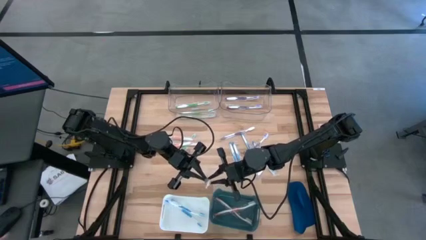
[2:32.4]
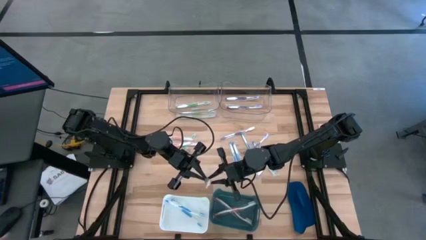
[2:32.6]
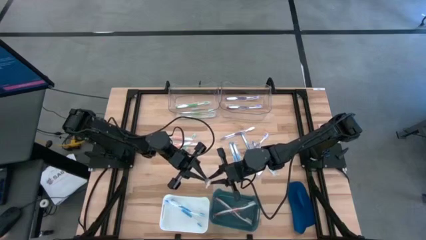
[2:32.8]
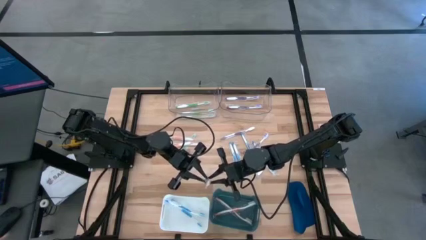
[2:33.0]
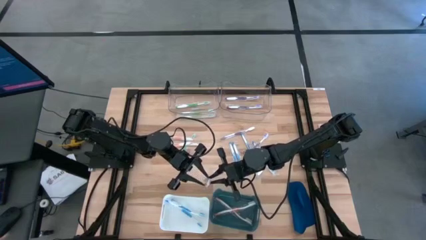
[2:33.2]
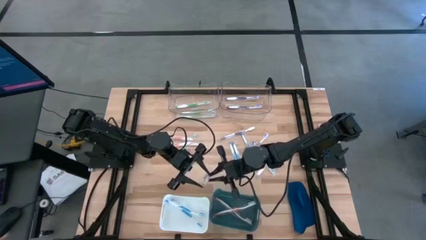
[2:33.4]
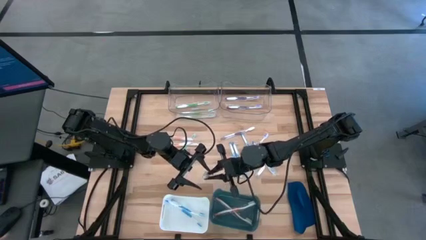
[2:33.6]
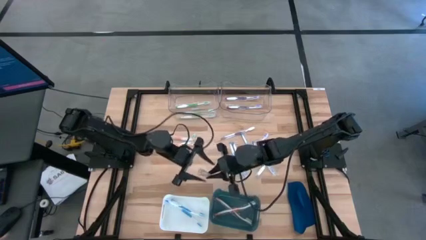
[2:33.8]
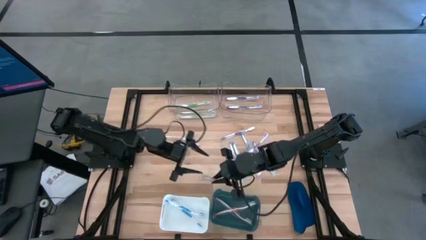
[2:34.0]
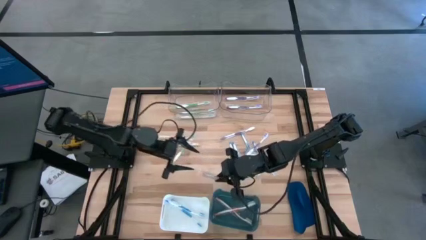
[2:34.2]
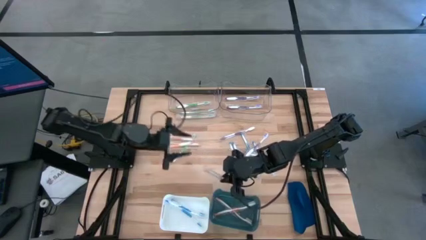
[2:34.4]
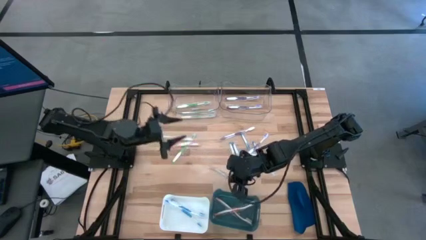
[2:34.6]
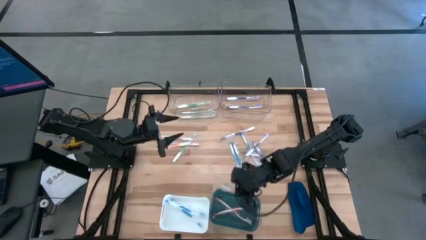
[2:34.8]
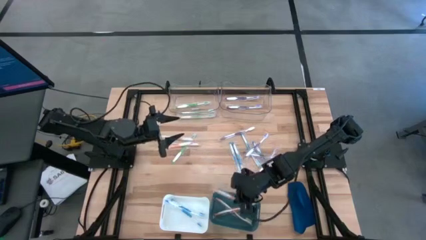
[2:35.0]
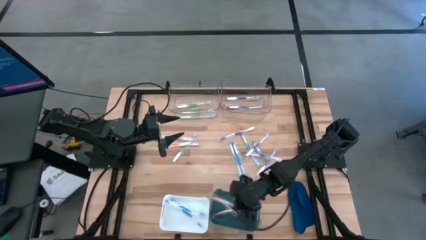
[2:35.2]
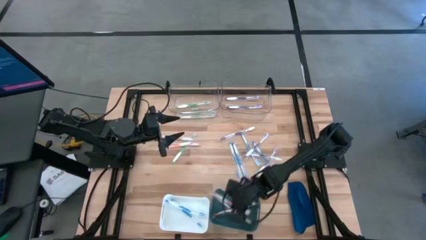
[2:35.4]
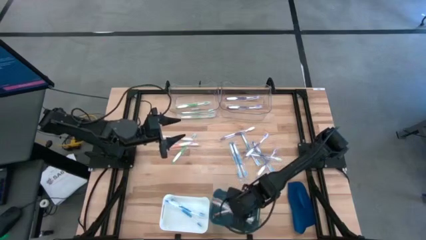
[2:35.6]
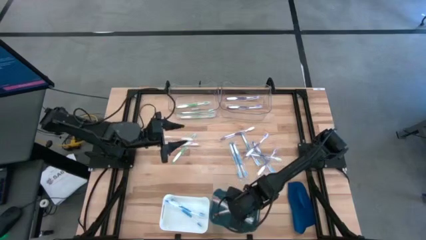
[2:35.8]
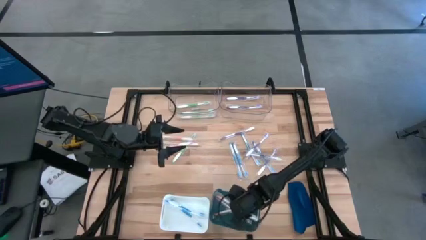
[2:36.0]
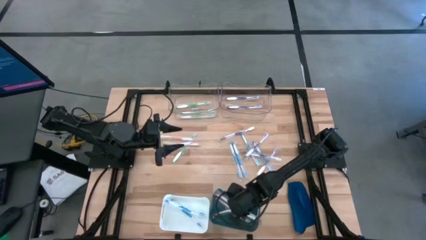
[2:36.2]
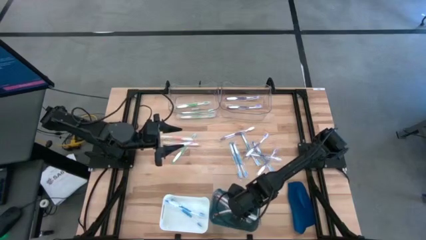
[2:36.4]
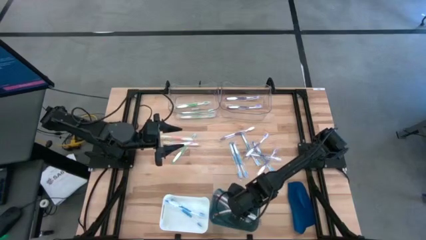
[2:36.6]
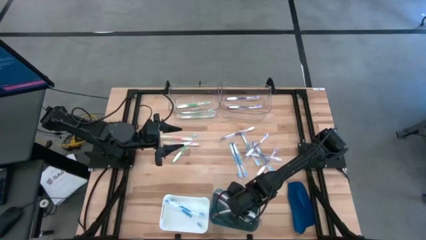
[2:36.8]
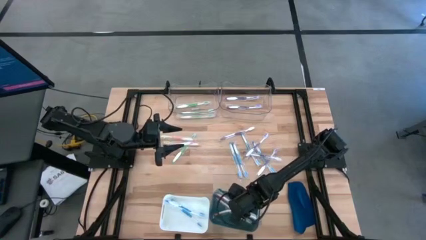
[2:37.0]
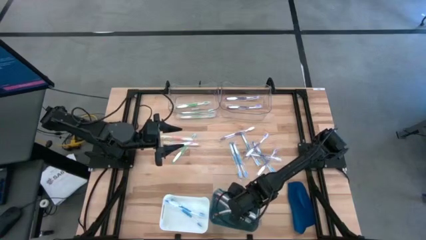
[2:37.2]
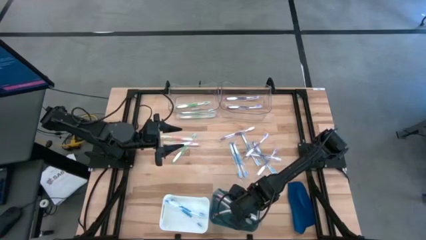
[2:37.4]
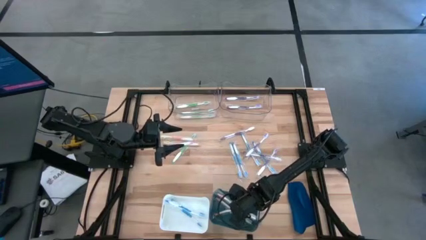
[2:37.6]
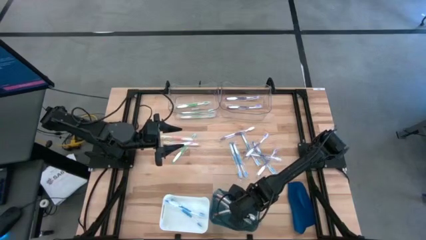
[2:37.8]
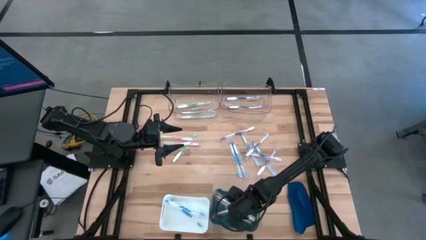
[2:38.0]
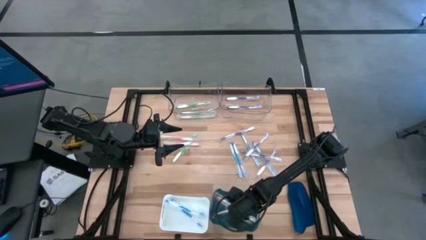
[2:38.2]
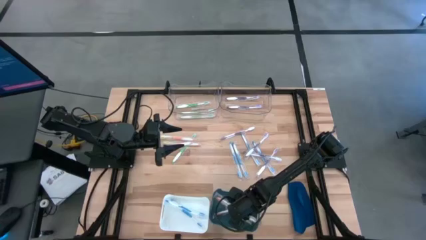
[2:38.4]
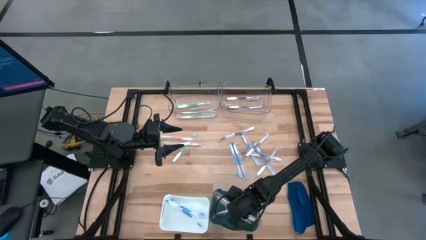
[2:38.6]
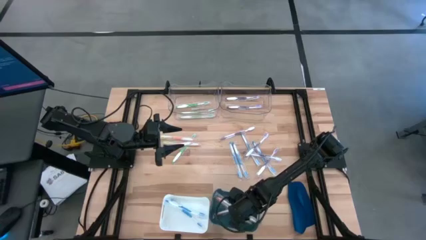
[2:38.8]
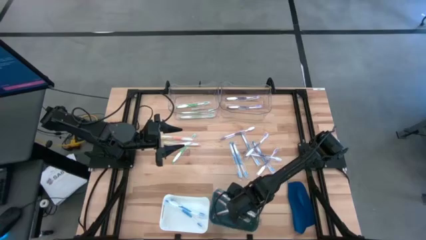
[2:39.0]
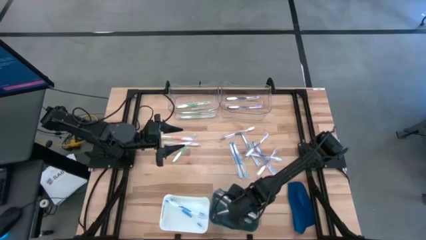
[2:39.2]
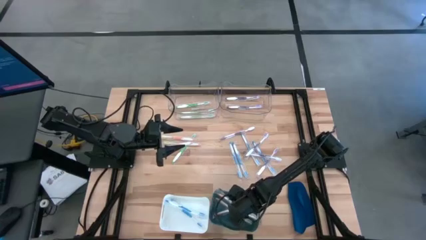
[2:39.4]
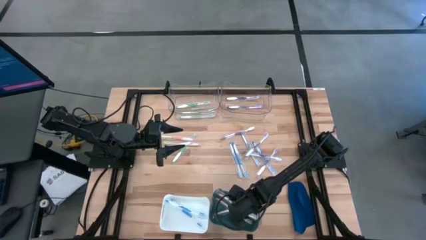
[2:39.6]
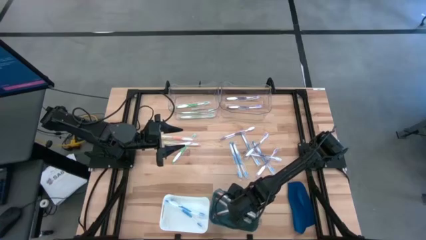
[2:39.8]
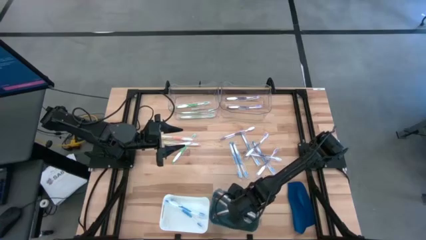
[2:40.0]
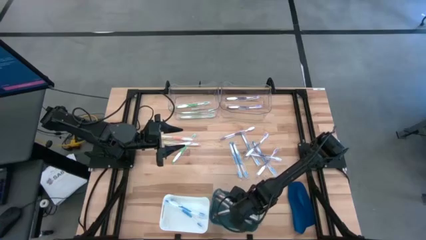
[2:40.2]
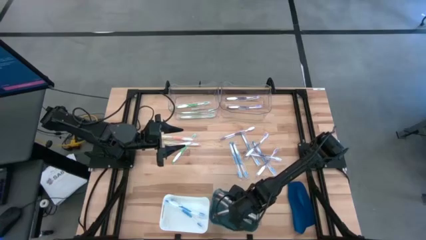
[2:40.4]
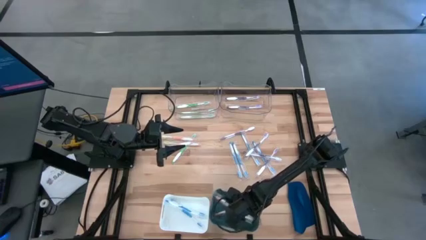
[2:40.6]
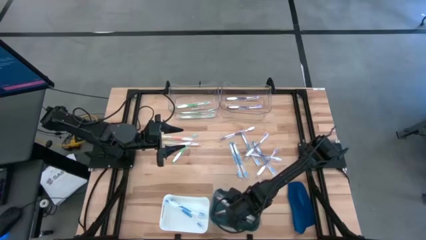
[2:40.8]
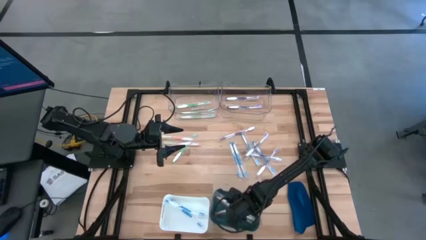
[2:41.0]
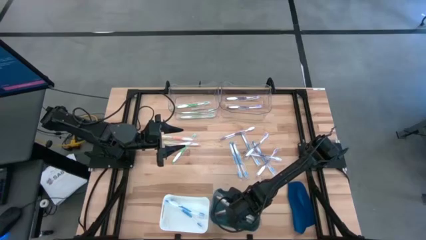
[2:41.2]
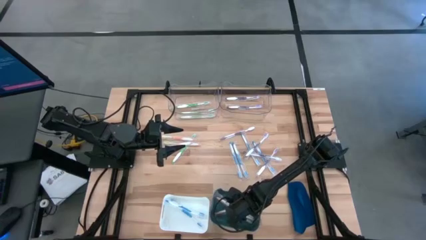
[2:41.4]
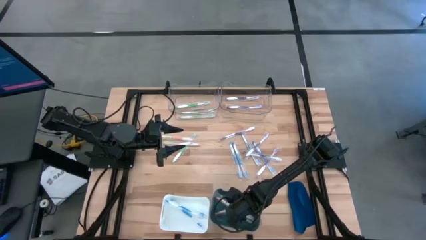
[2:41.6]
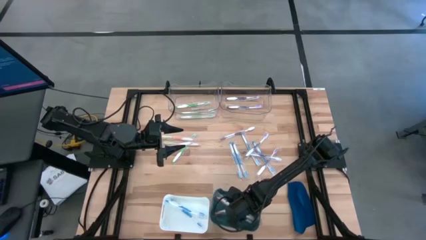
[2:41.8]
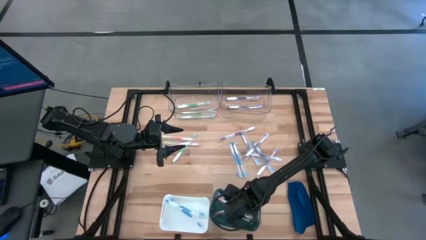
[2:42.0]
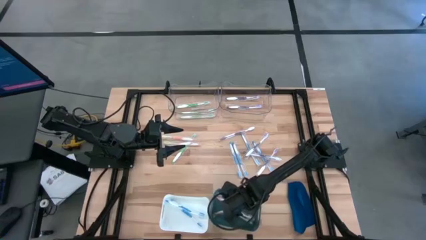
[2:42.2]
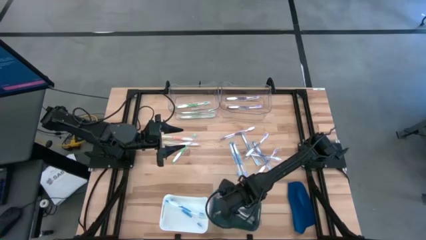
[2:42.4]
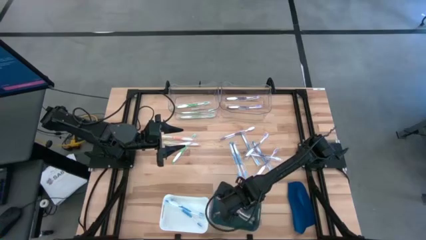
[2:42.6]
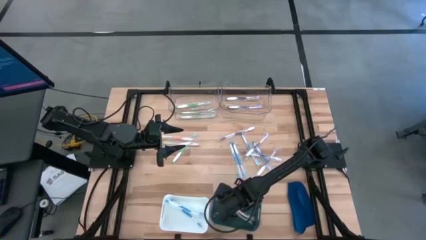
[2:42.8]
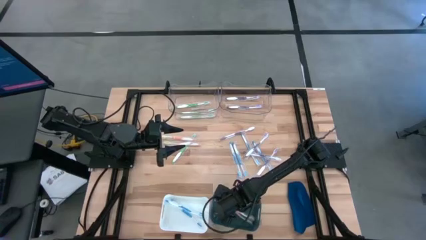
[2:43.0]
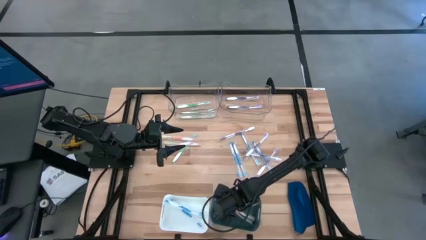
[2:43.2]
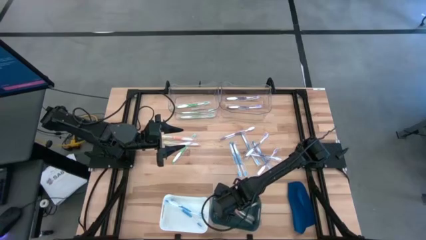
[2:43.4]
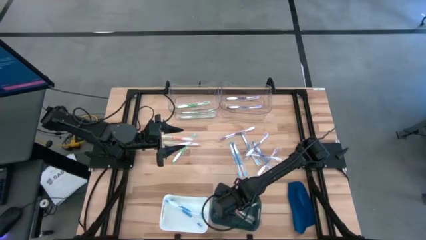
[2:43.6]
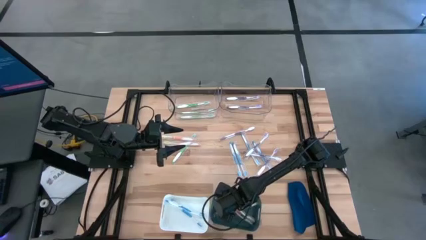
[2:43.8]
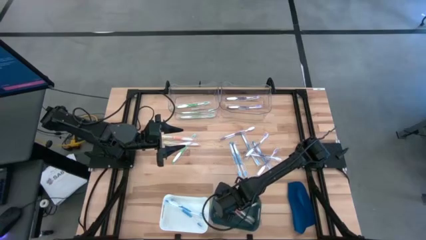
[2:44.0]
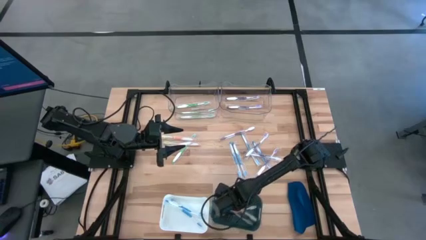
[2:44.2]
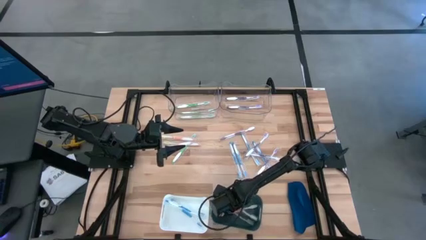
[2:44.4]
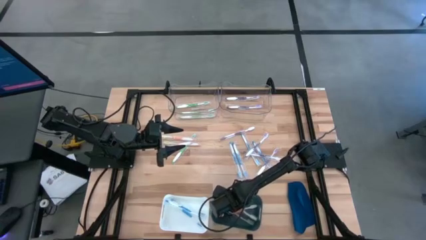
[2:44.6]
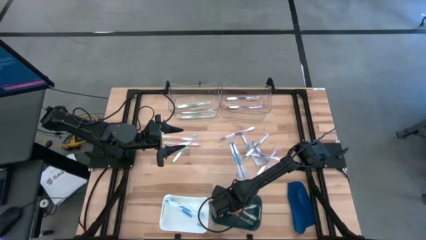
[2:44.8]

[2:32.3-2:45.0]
Task: Pick & Place Toothbrushes
Put the orange toothbrush into the green bin

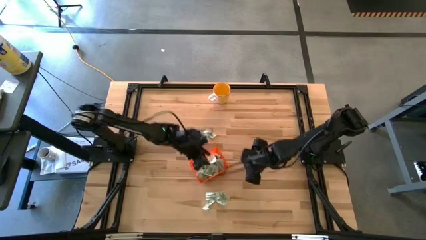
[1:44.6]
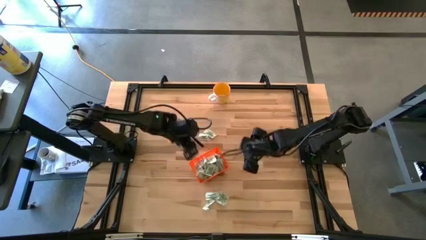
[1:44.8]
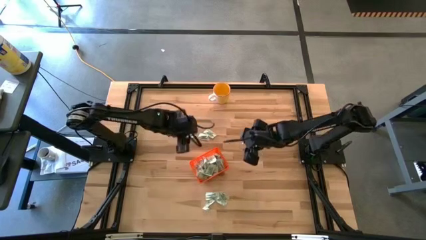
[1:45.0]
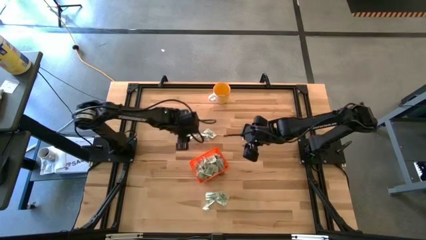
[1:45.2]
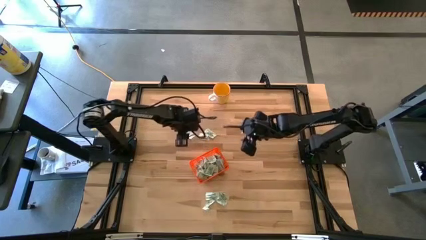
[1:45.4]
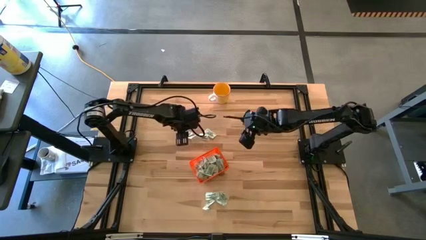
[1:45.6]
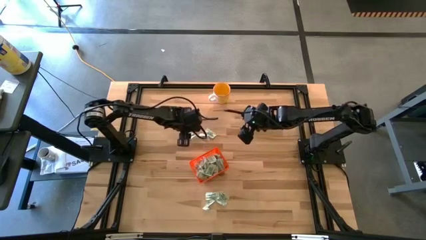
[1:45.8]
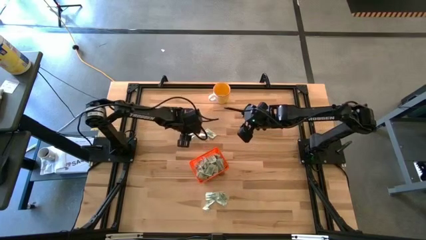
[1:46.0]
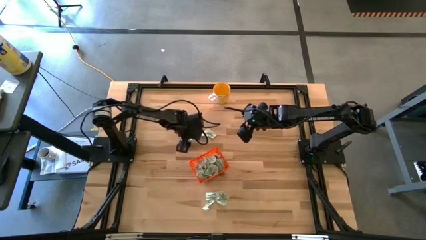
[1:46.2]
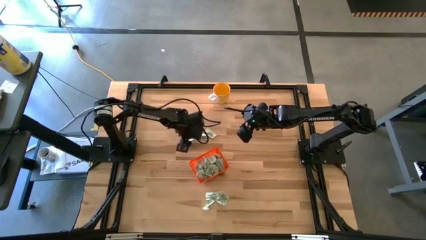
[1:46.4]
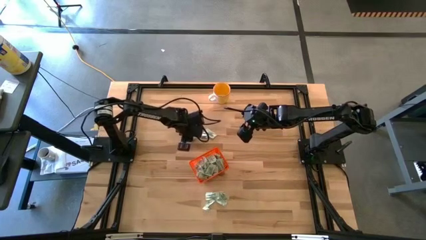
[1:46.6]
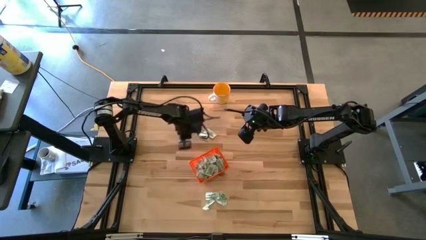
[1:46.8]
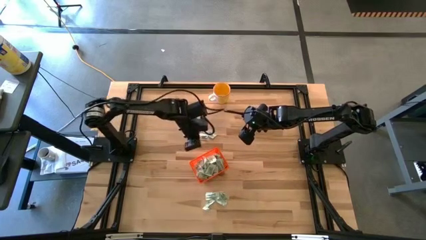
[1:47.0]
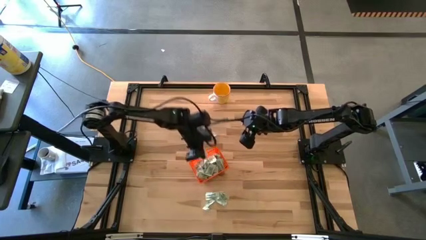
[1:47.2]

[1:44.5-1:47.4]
Task: Pick and place Stevia / Truvia into bins
Put the stevia packet into the bin

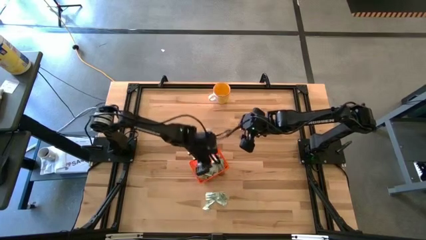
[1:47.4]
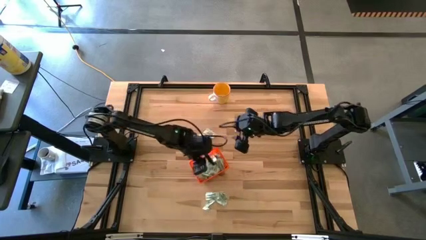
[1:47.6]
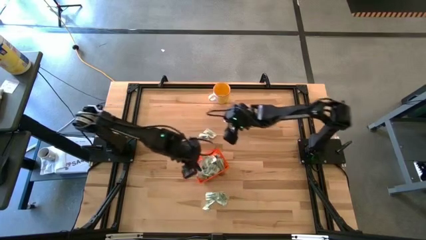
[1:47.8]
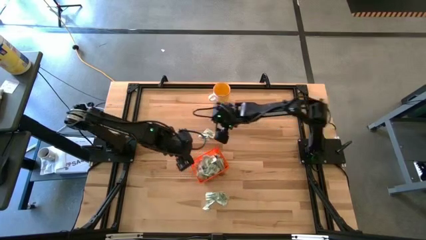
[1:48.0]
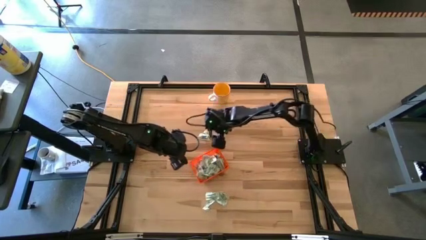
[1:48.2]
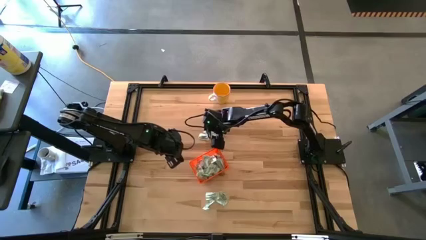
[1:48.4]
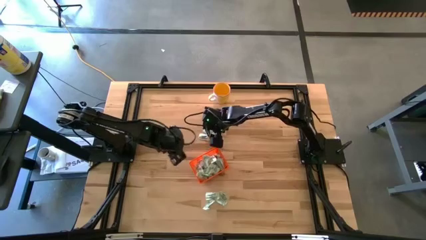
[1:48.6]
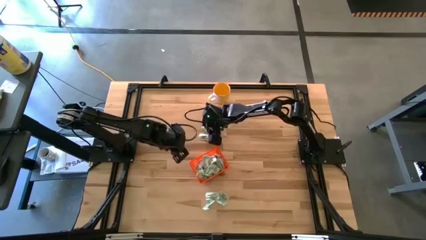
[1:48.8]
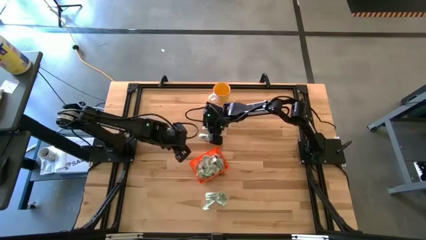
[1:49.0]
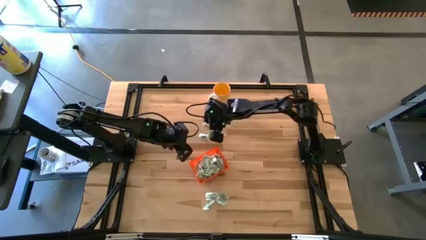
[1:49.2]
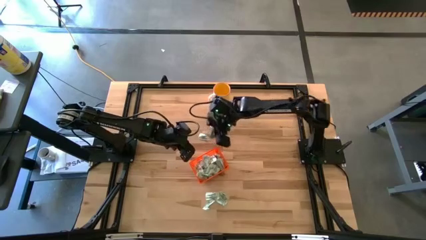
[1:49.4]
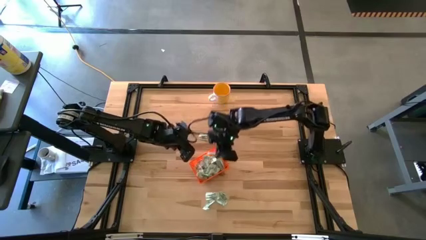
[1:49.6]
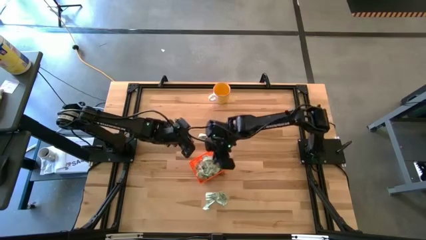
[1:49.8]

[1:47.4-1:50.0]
Put the stevia packet into the bin
